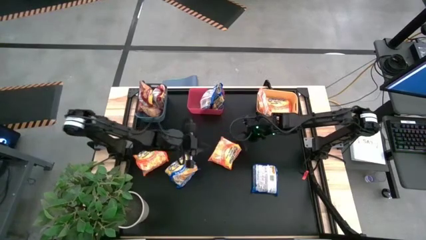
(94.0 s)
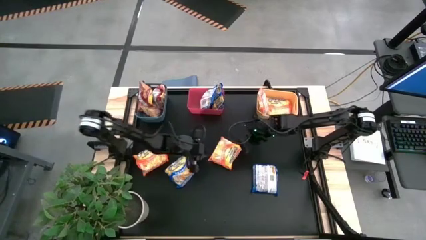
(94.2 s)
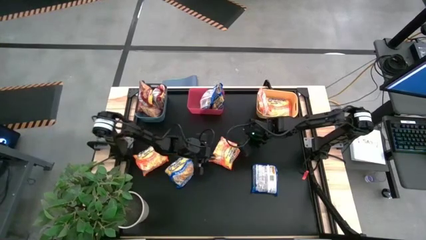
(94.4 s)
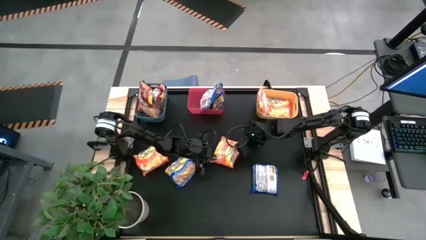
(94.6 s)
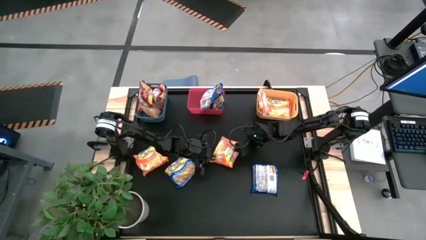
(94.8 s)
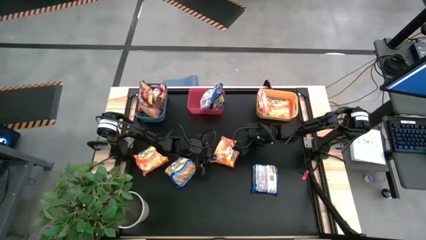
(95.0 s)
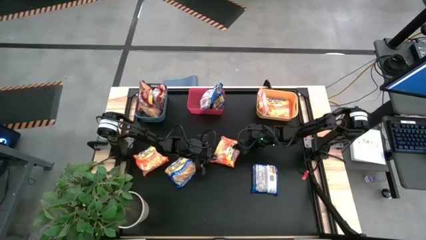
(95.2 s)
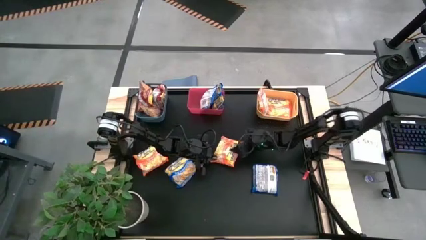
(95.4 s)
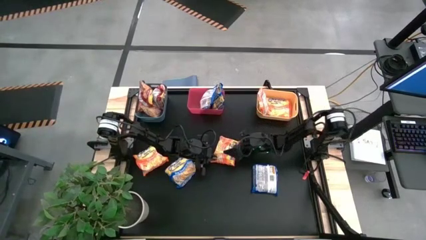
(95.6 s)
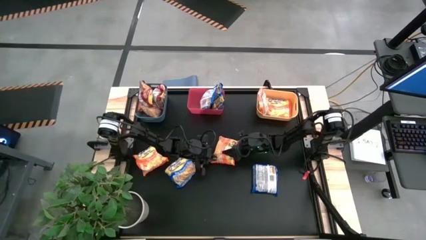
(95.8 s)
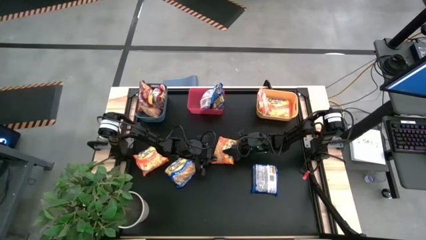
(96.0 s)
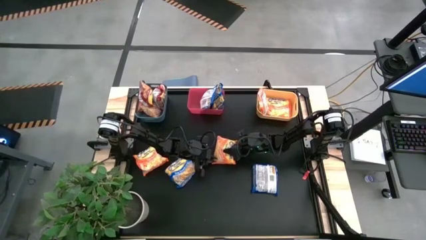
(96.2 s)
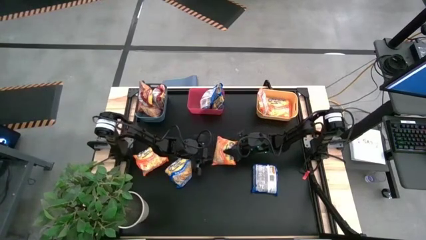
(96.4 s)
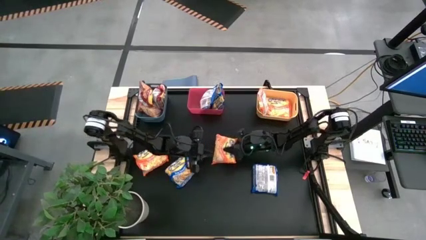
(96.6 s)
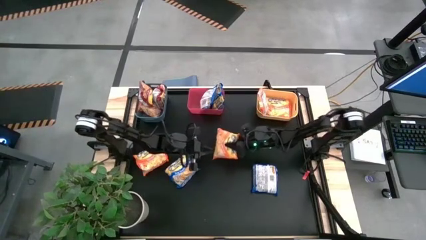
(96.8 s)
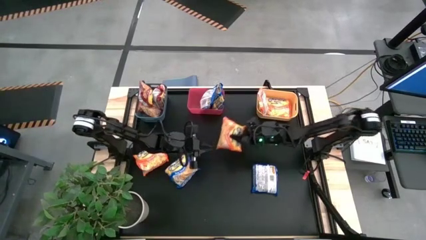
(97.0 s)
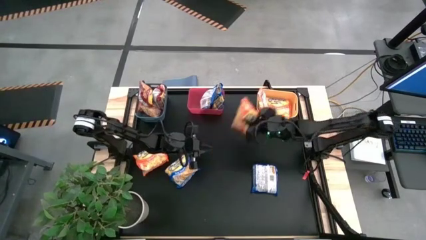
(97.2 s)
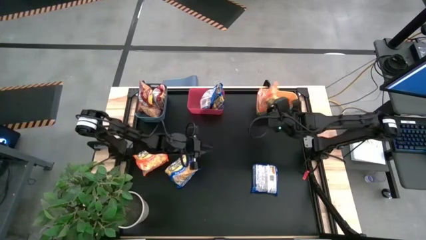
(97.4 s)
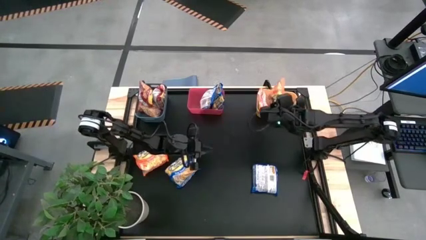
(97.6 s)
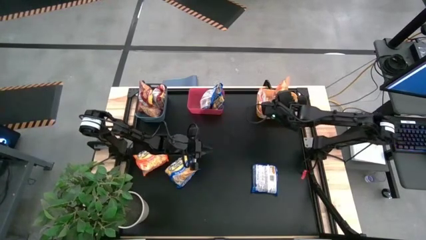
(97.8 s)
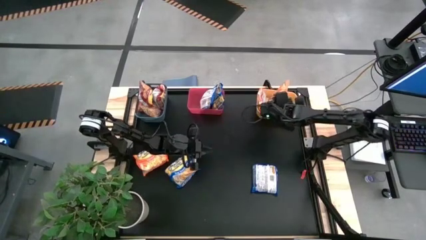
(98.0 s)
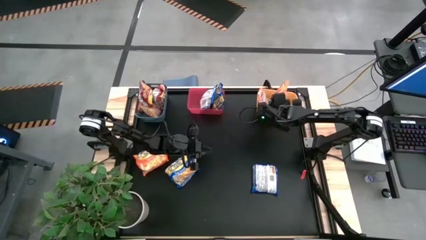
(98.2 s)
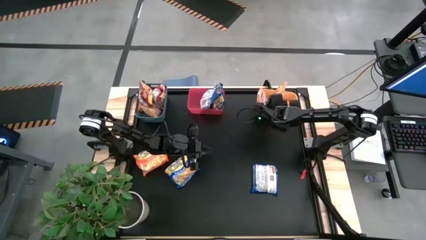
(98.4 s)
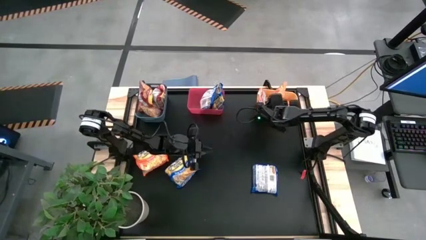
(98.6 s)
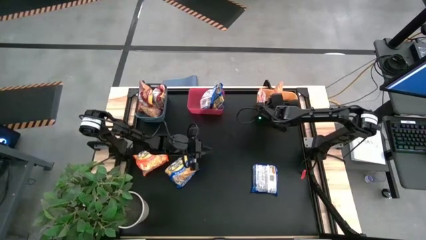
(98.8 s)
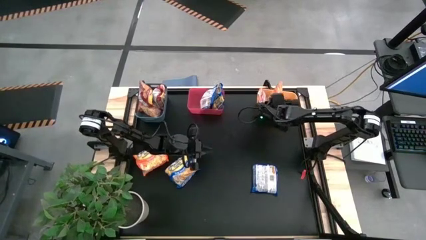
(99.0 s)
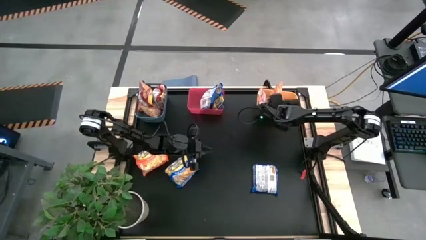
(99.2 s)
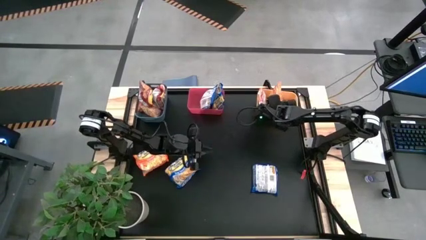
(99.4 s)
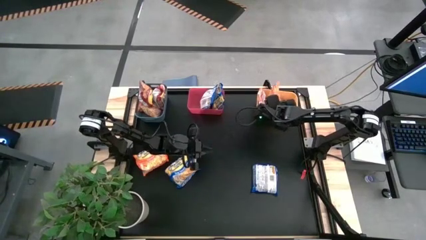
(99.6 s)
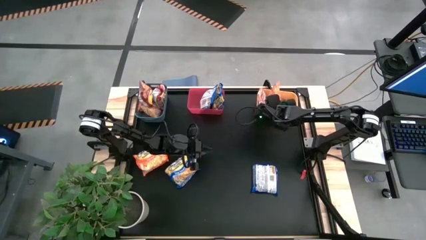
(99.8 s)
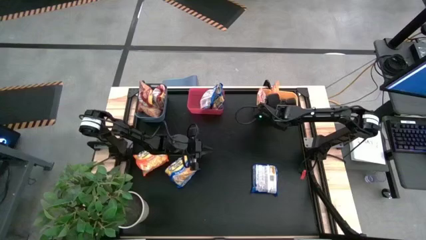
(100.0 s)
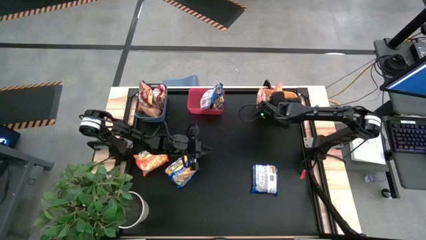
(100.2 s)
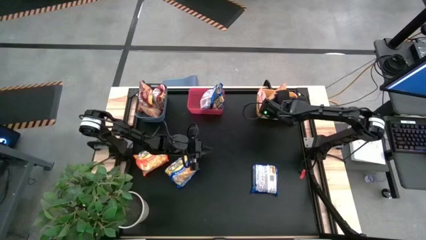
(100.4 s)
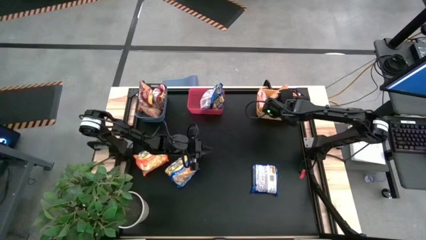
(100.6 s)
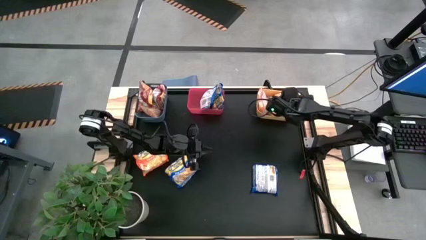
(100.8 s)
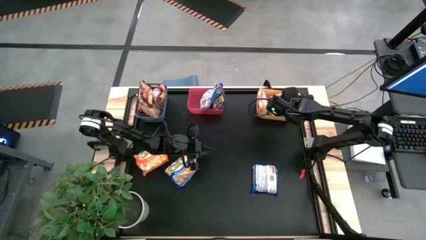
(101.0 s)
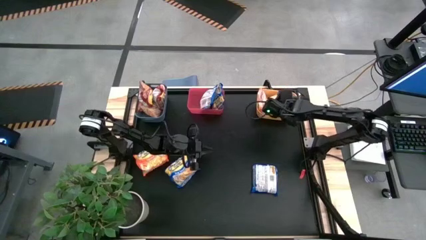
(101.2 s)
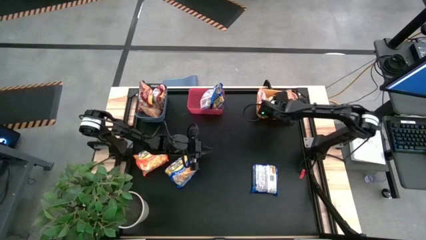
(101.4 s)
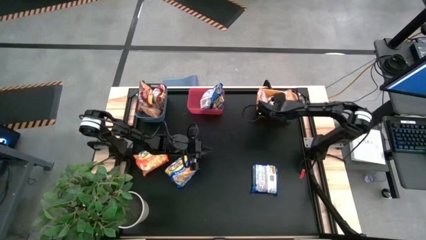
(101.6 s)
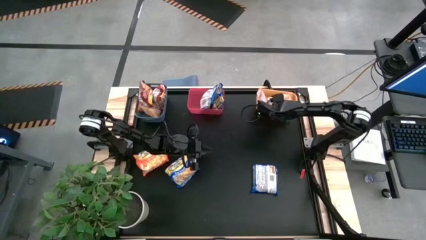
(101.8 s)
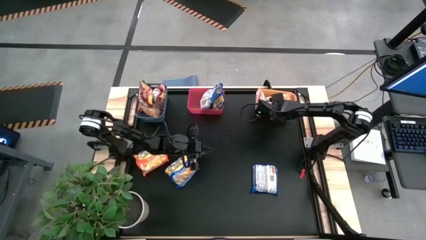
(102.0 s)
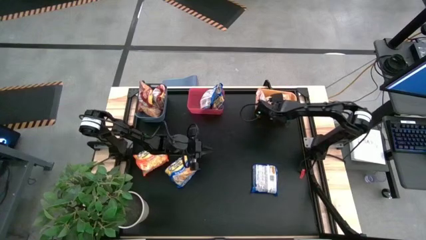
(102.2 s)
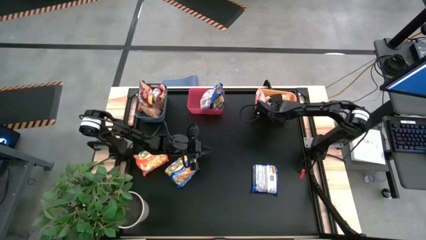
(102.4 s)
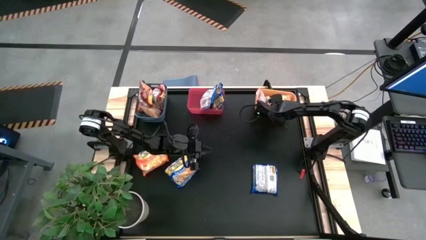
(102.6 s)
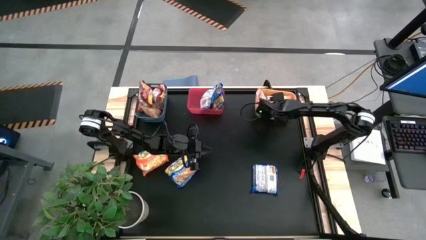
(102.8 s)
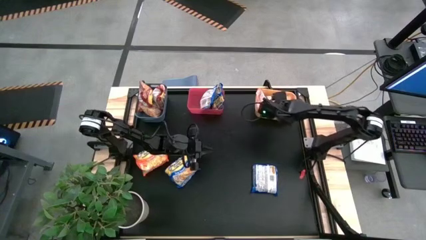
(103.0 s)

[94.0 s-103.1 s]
Task: Sort Maruchan noodles
Put the orange noodle pack into the yellow bin

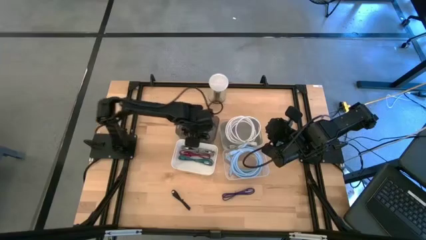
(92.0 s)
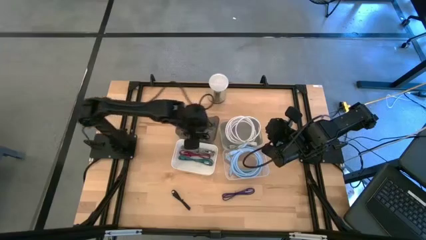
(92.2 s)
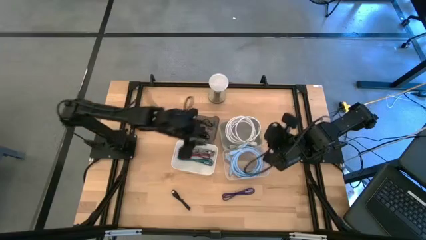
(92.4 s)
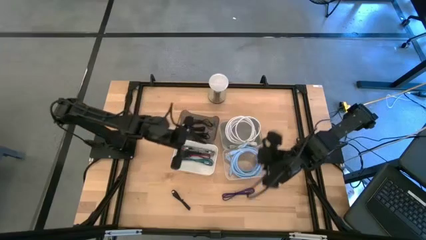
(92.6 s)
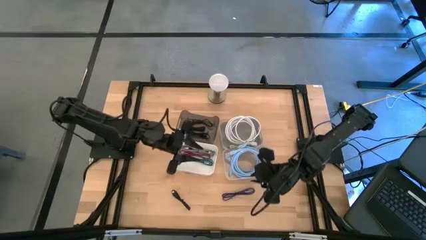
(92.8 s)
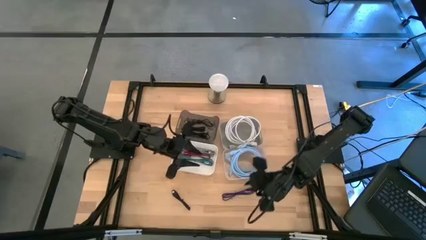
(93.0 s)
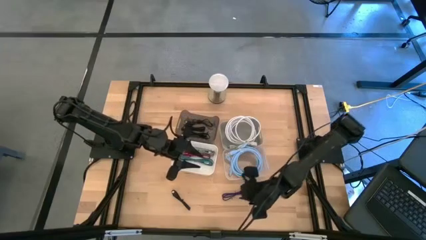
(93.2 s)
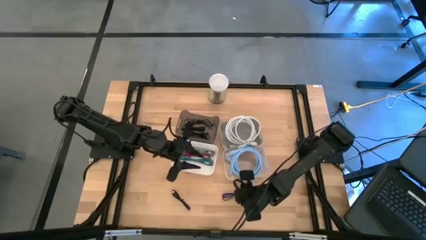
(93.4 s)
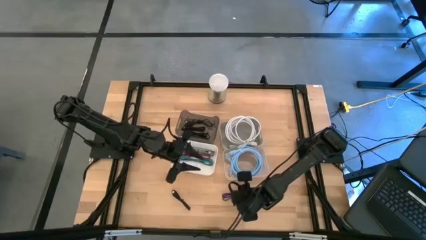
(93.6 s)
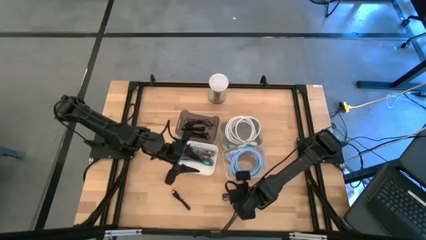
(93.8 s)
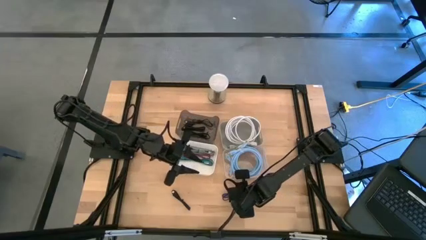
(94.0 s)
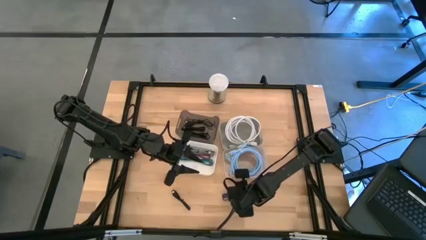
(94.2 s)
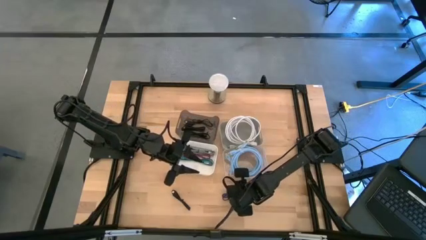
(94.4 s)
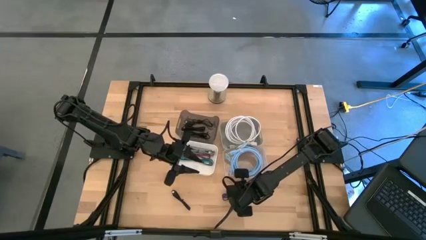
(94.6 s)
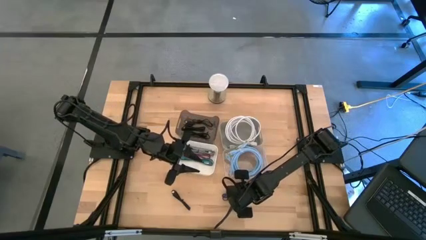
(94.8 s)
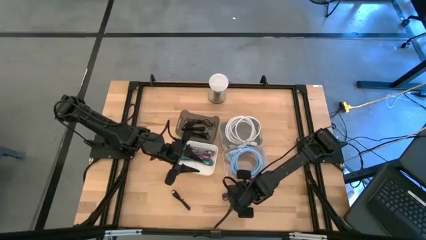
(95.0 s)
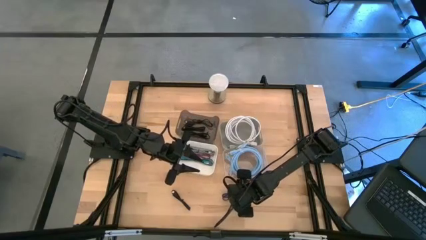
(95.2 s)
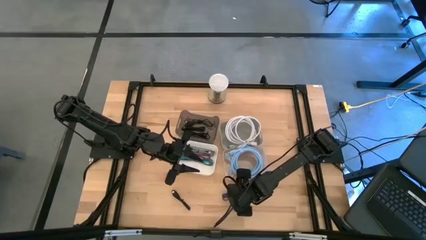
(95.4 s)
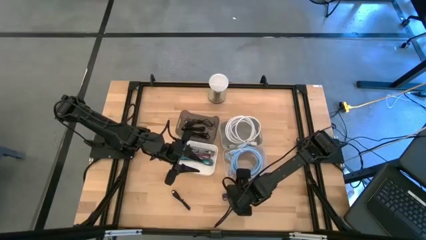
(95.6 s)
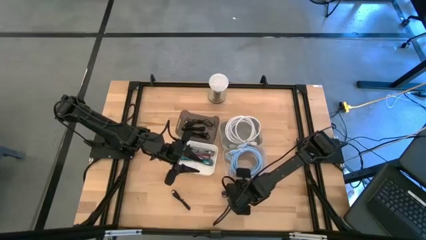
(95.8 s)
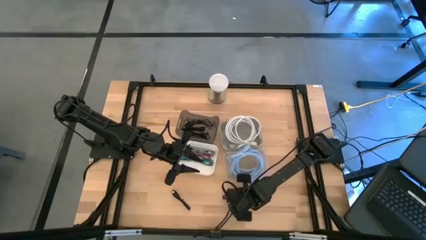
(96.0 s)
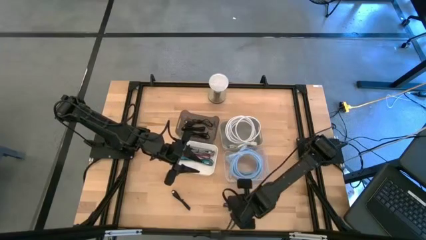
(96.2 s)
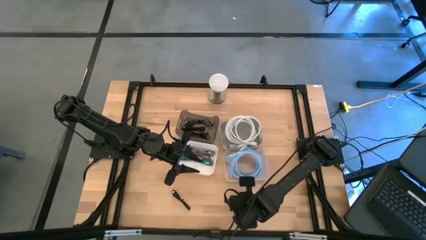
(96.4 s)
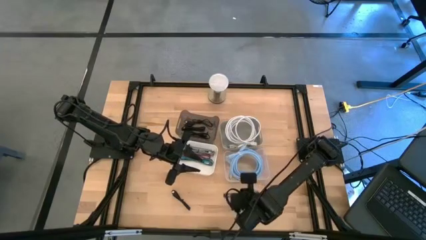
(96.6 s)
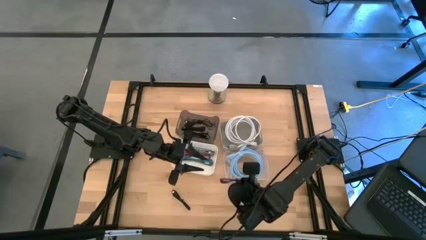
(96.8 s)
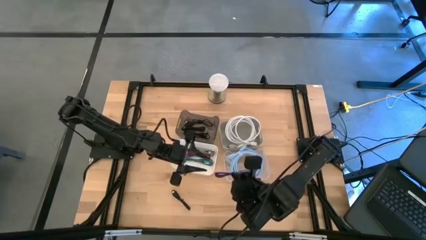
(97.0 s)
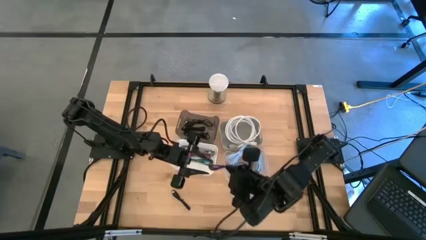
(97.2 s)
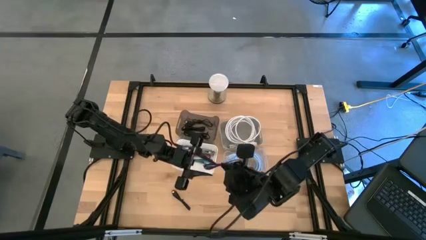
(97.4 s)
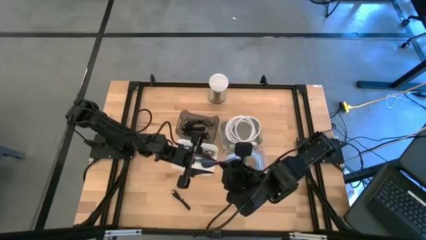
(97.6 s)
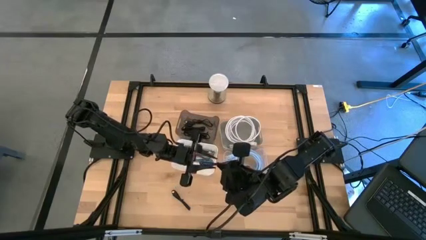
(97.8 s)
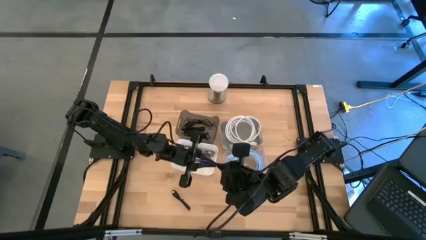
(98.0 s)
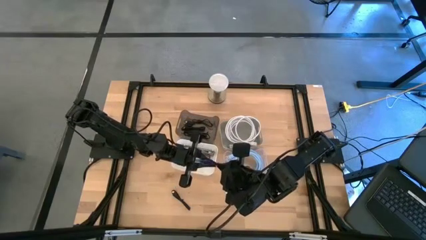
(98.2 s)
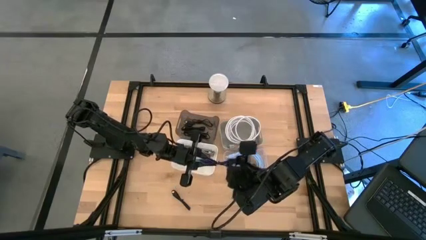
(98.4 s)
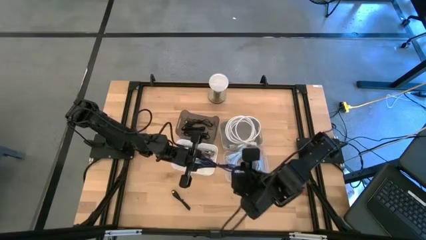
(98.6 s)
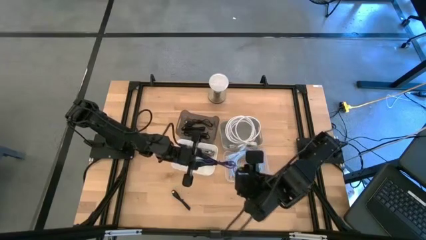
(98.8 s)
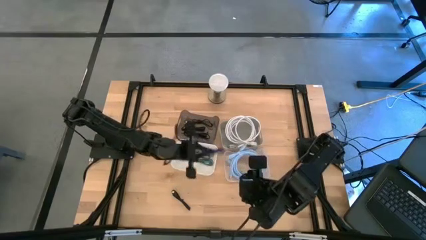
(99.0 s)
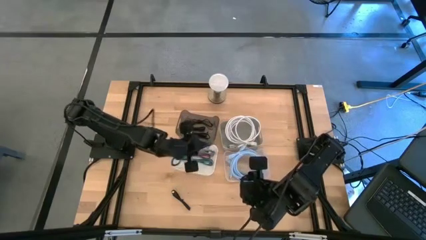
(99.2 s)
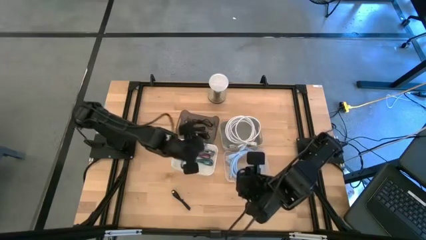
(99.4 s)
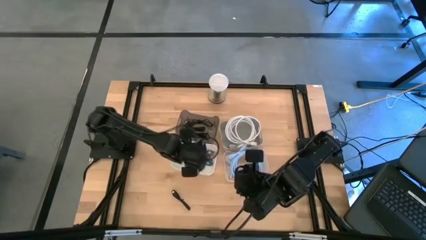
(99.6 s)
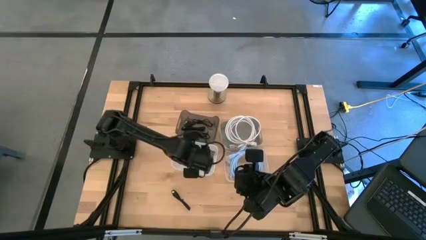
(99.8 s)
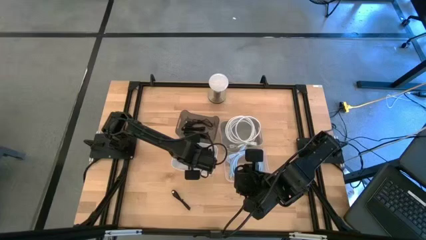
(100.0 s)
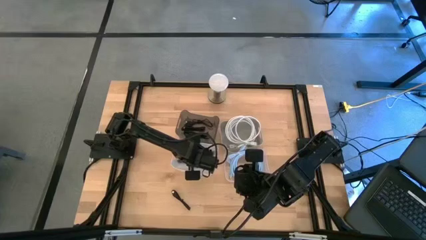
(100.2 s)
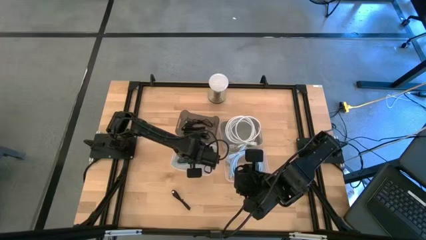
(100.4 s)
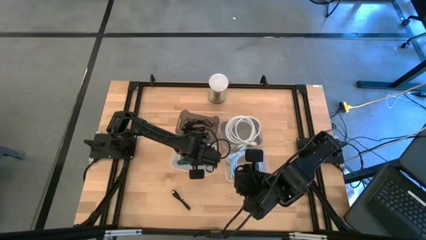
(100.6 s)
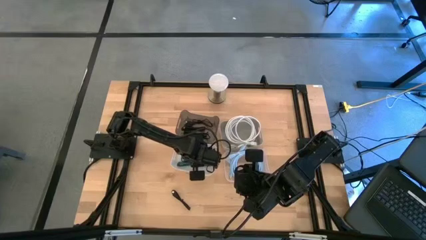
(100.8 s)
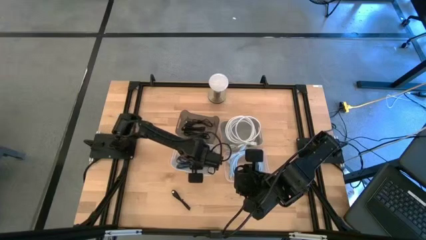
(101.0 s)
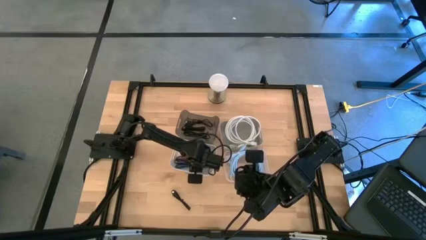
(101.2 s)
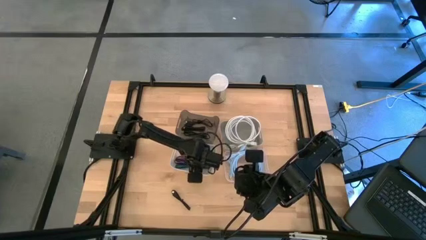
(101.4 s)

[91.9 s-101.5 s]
Task: Pick & Place USB Port
Put the purple patterned charger cable into the white bin
